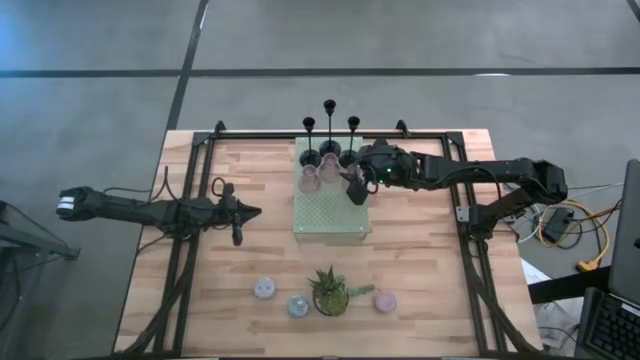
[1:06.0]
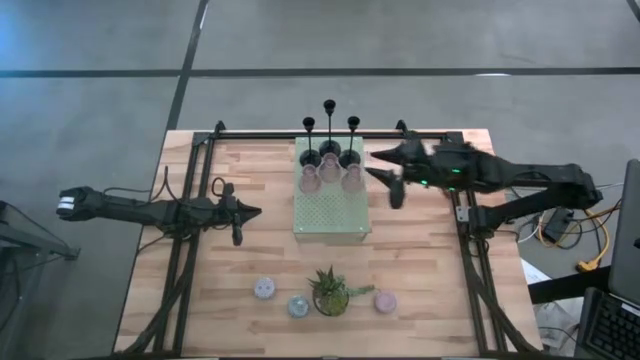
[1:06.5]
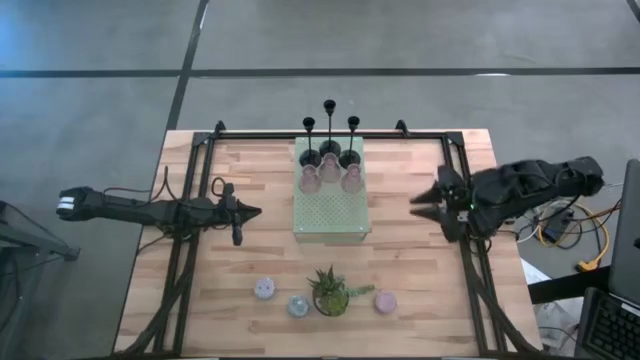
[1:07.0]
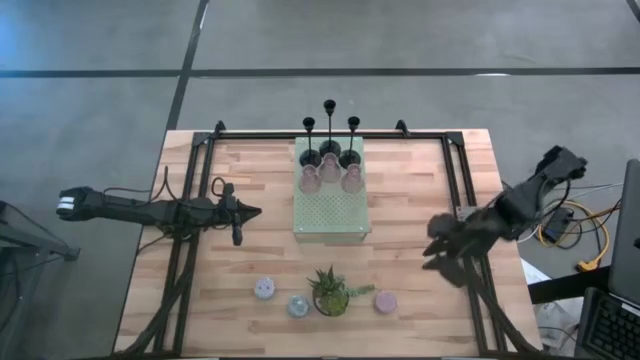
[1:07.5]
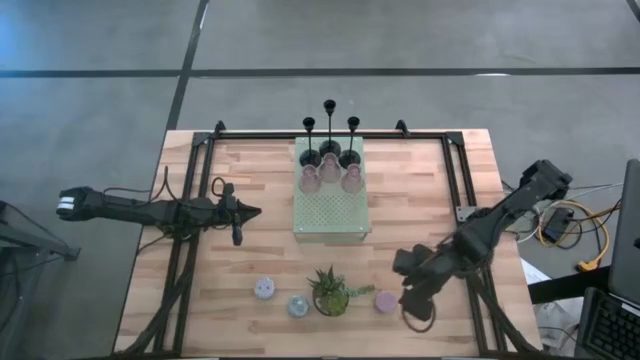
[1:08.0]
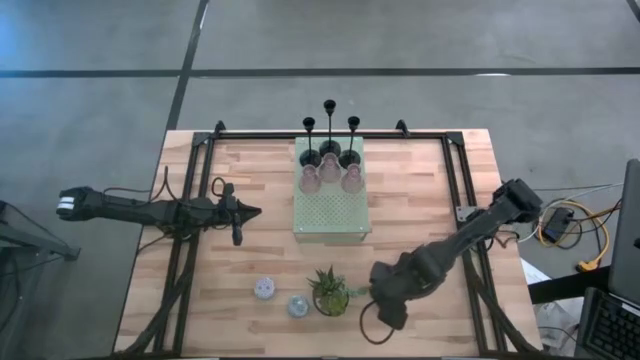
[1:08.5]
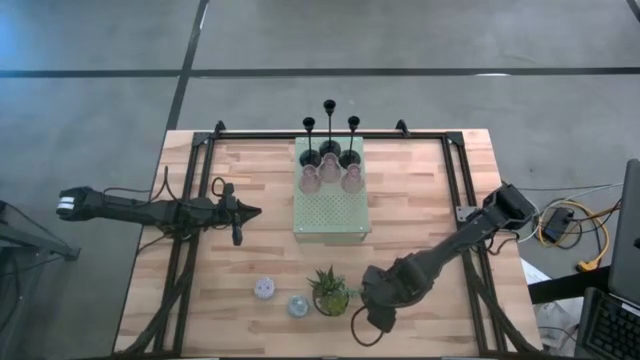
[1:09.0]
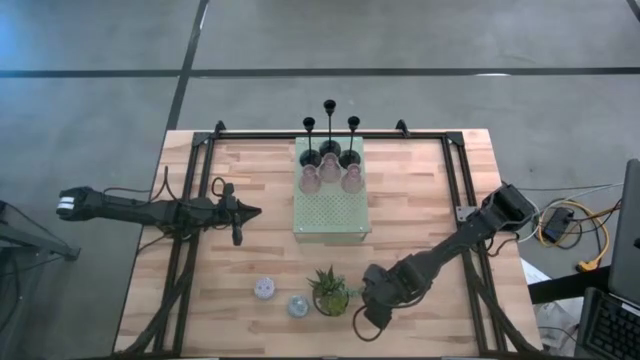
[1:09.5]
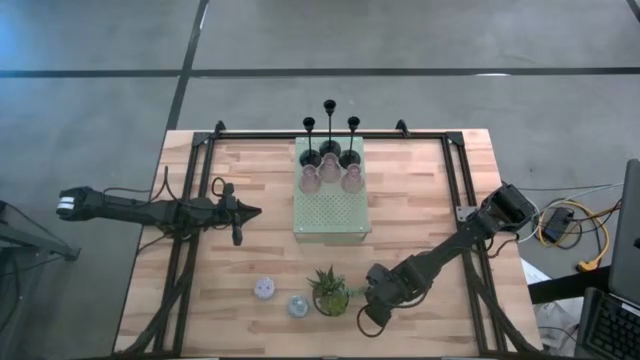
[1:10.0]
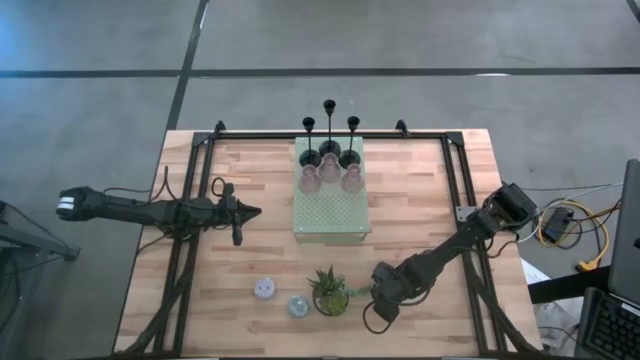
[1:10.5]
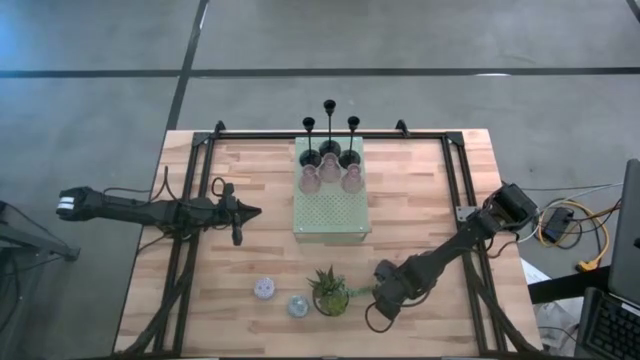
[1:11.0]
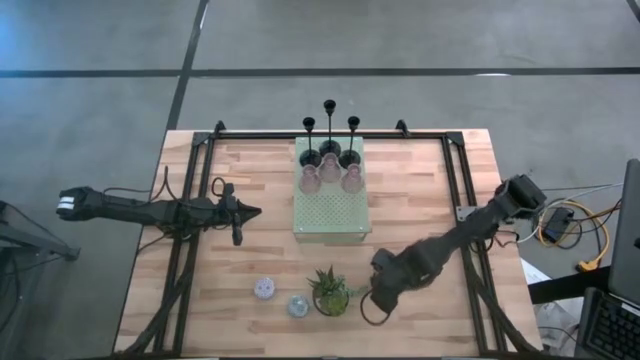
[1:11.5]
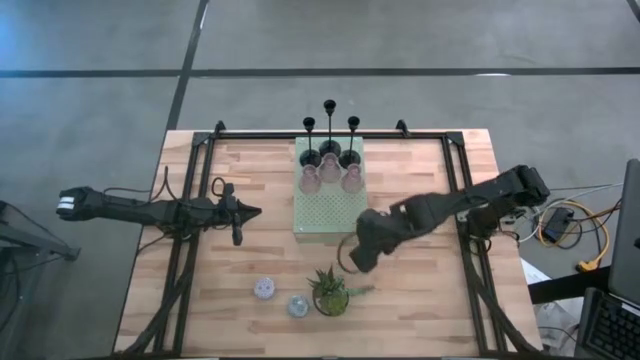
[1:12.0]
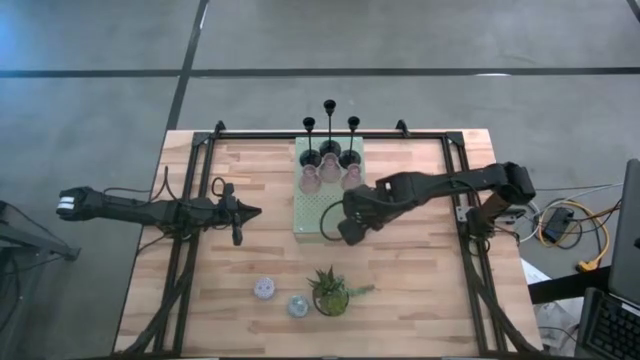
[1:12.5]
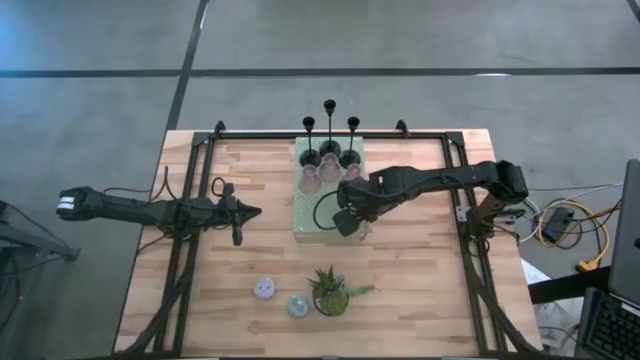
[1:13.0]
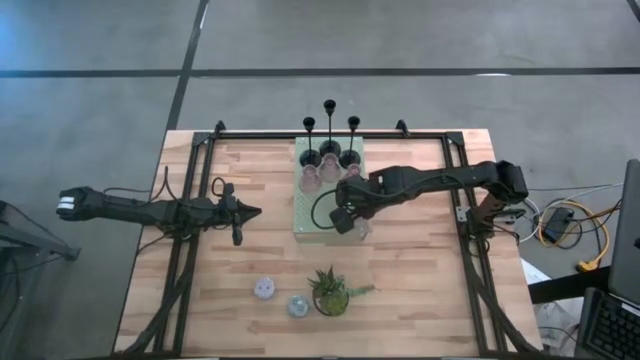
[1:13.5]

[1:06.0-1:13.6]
Task: Pick & Place candle stick holders
Put the pink patterned scented candle on the shelf

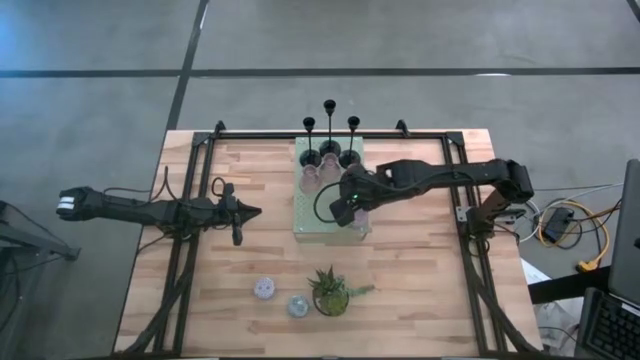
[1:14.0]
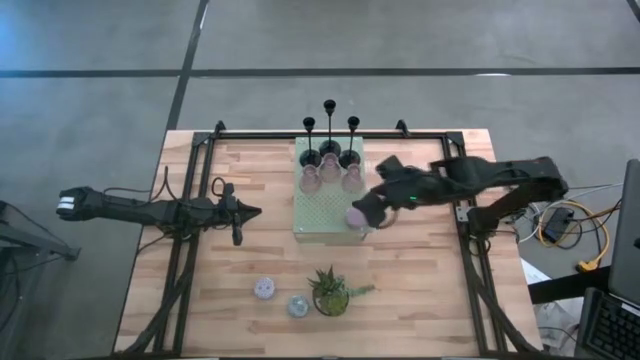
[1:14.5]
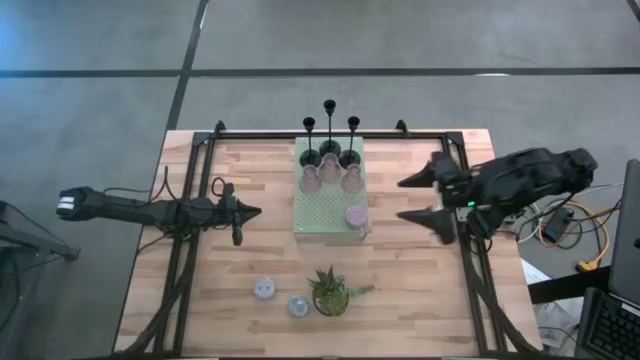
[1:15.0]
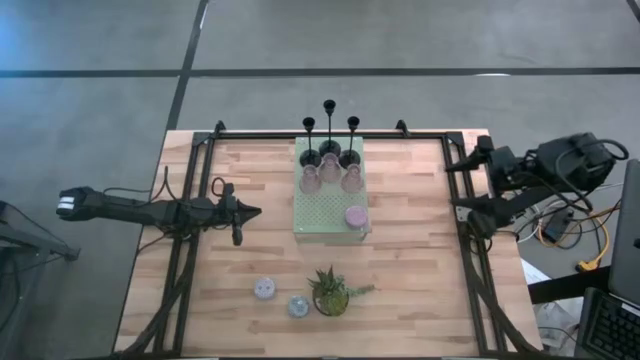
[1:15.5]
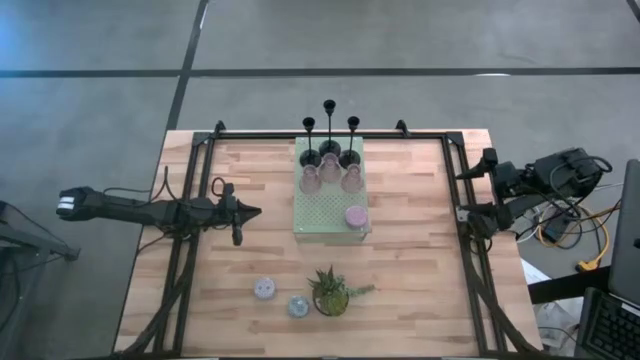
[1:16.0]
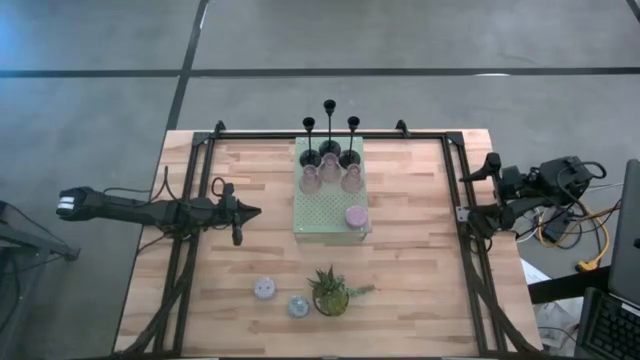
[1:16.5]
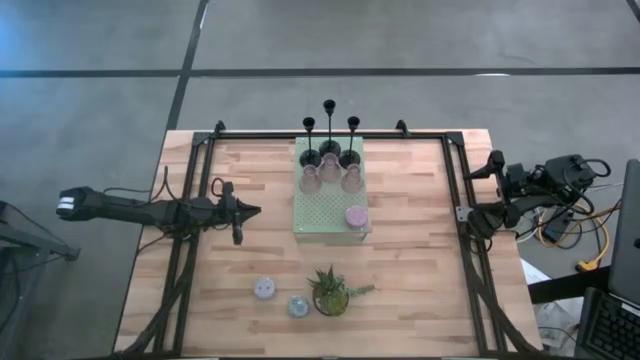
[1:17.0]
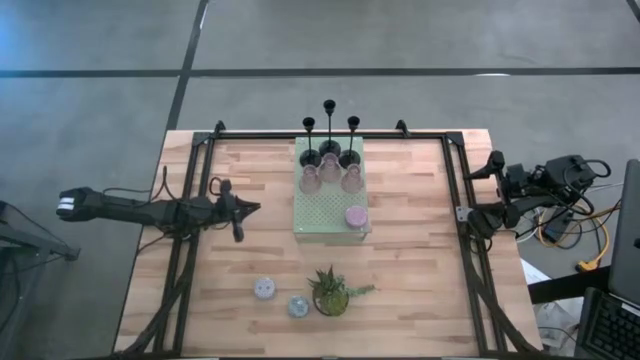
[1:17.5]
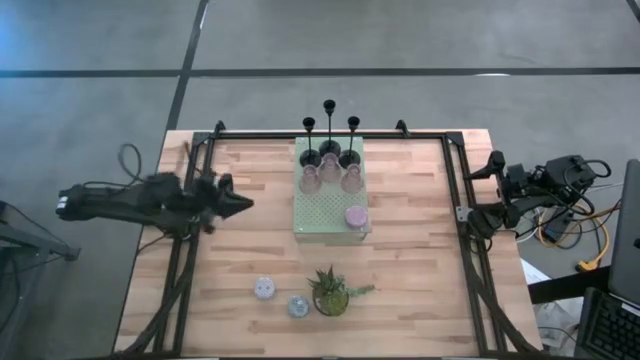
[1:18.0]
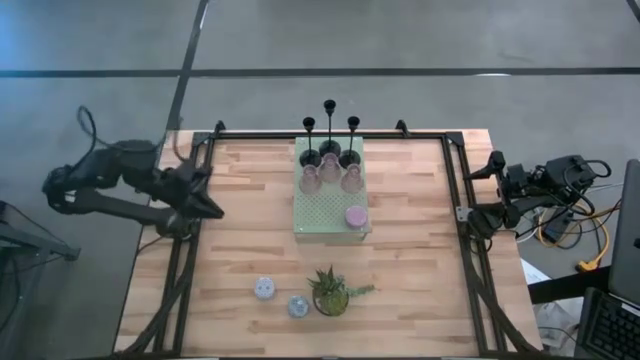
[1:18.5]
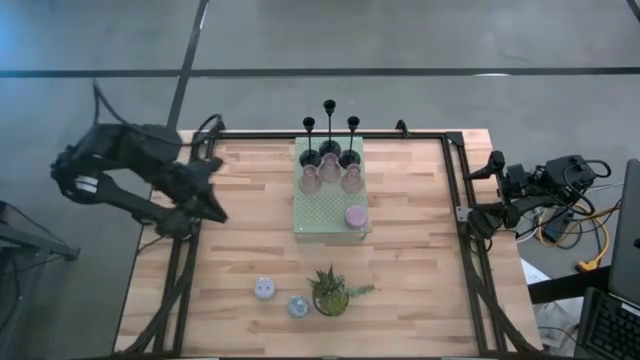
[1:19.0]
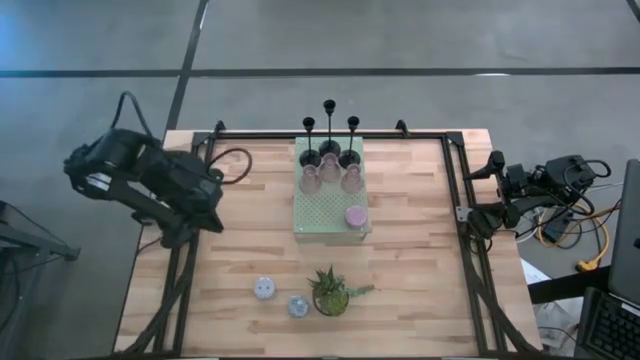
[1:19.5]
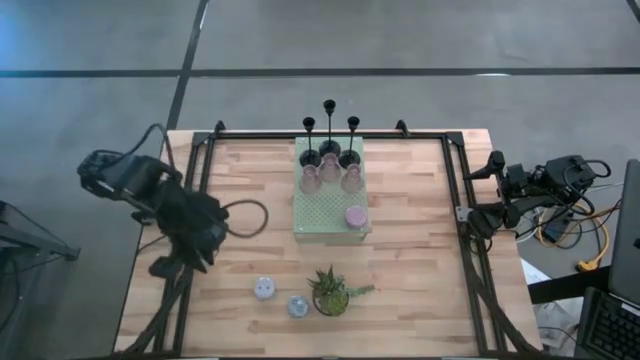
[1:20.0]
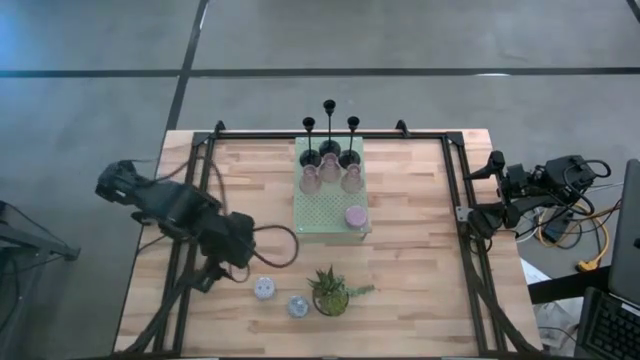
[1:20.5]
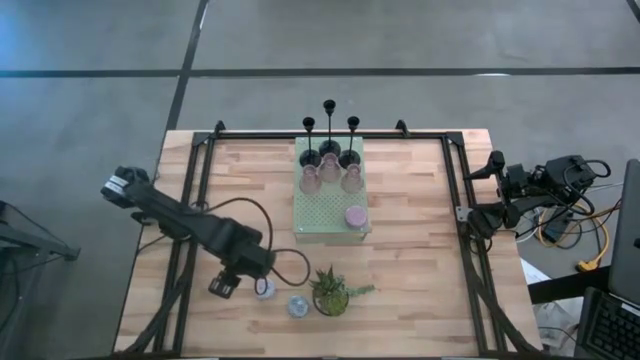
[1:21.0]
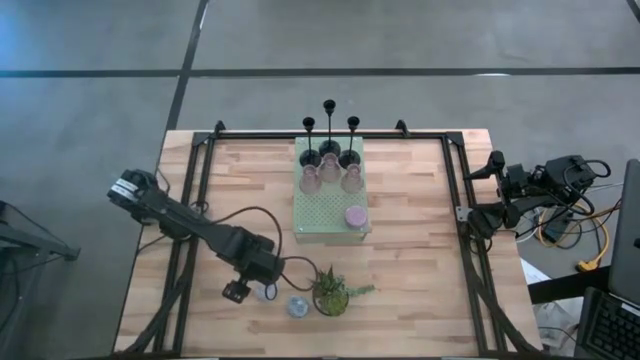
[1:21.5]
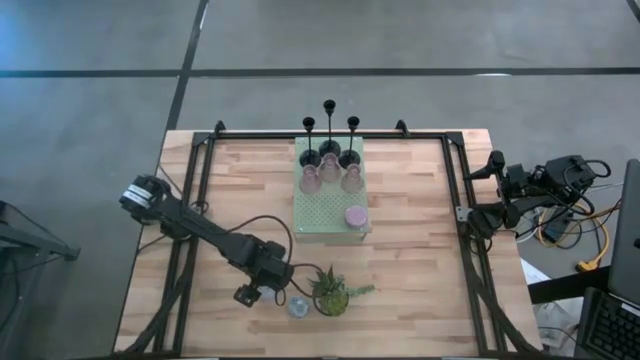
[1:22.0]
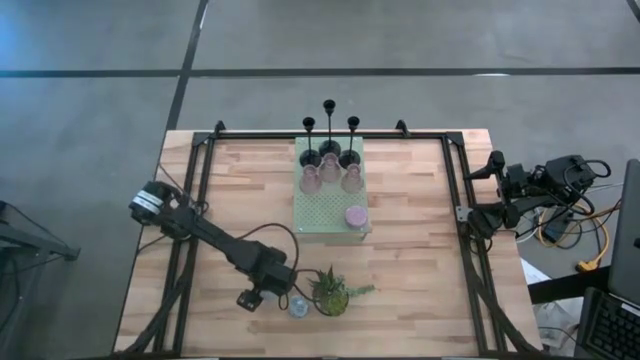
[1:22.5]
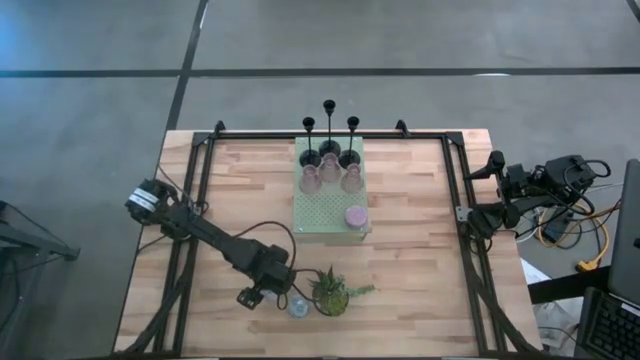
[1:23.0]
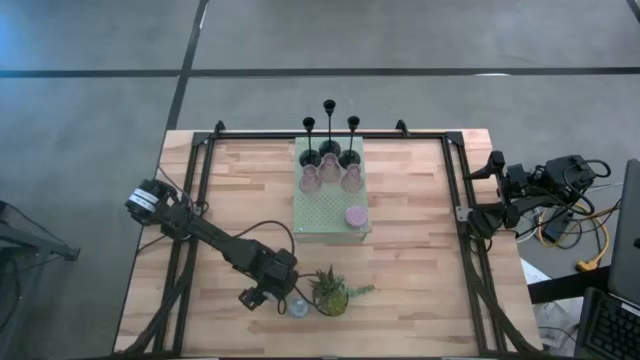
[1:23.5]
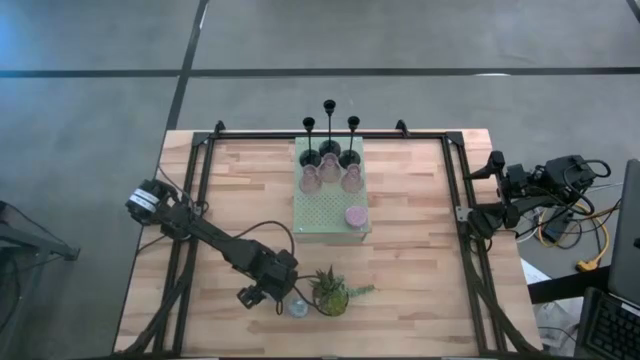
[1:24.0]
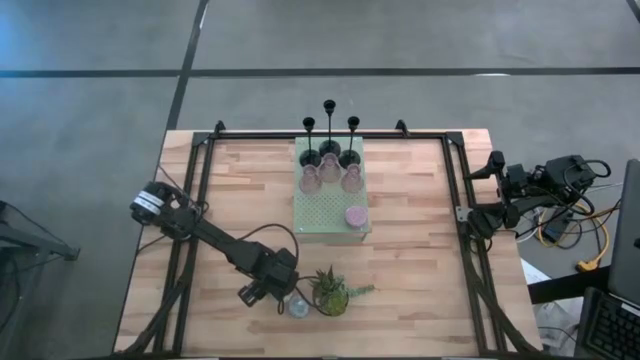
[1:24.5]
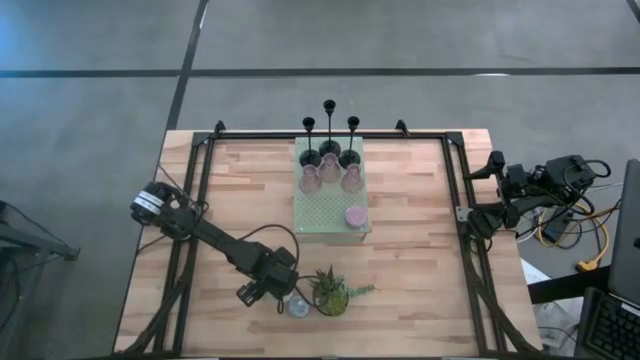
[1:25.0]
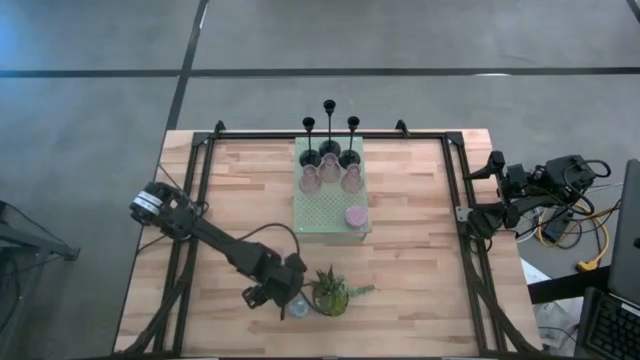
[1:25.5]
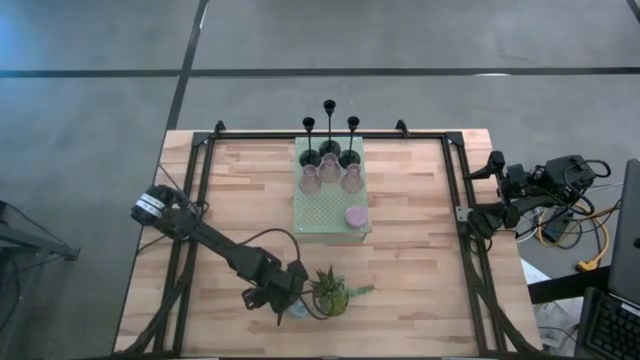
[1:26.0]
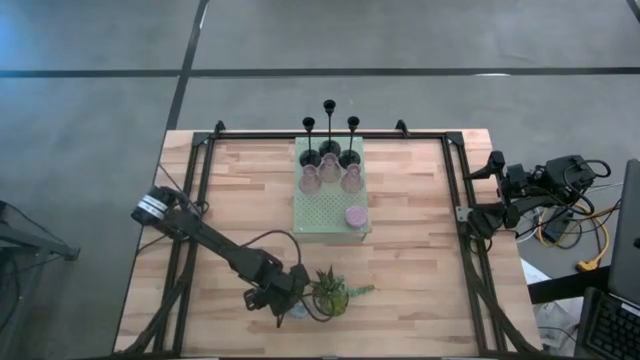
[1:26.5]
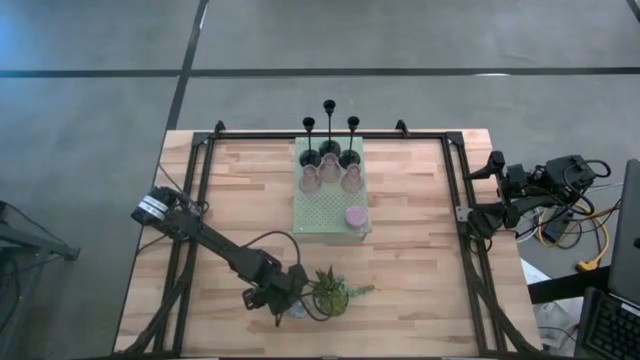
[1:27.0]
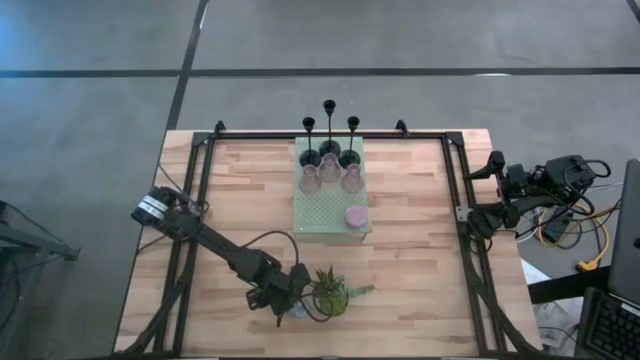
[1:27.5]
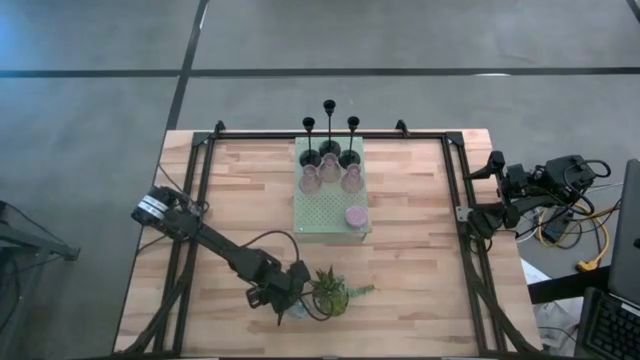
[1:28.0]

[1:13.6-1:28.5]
Put the red patterned scented candle on the shelf
